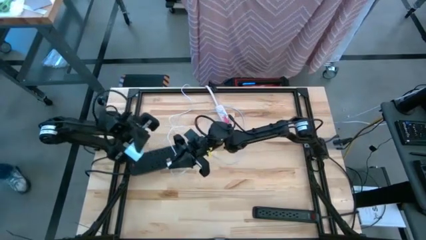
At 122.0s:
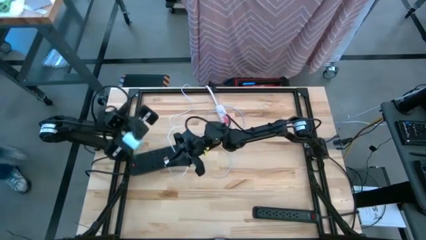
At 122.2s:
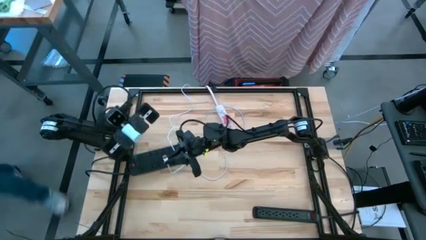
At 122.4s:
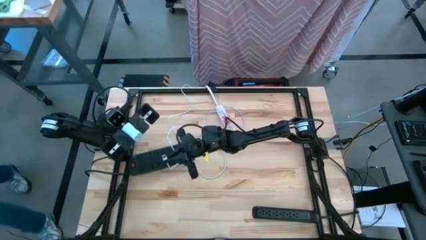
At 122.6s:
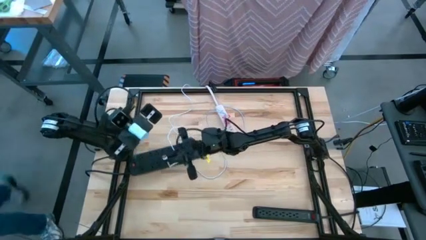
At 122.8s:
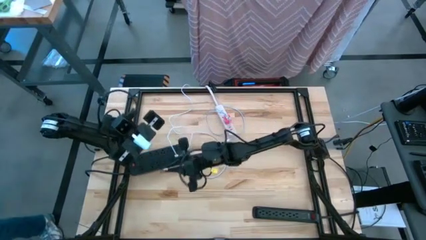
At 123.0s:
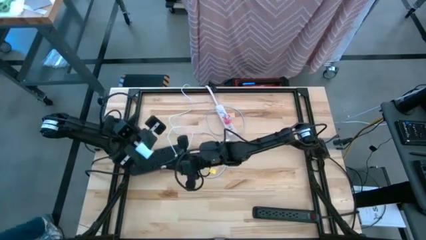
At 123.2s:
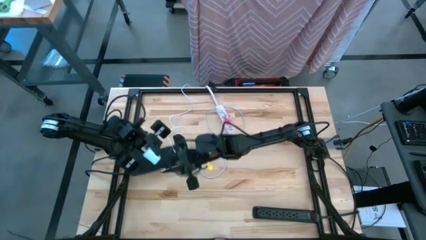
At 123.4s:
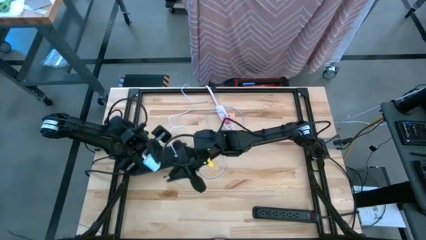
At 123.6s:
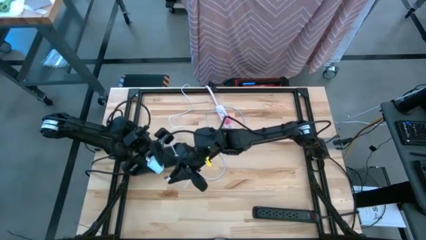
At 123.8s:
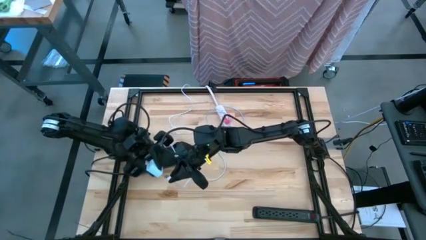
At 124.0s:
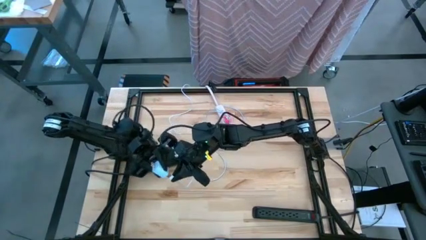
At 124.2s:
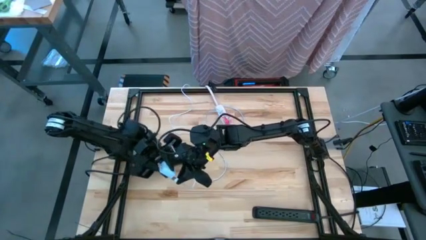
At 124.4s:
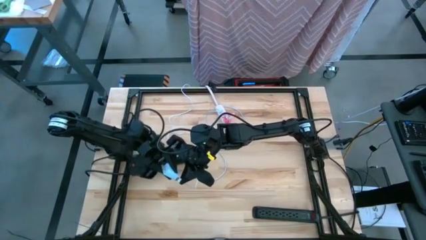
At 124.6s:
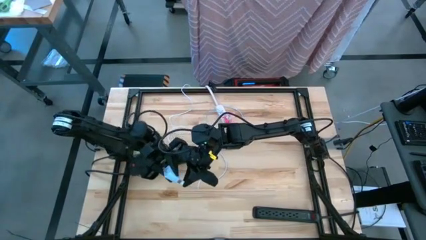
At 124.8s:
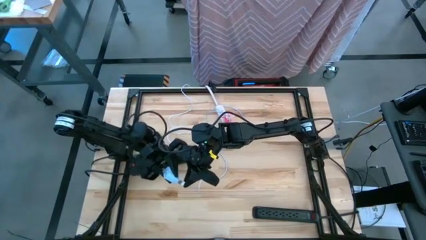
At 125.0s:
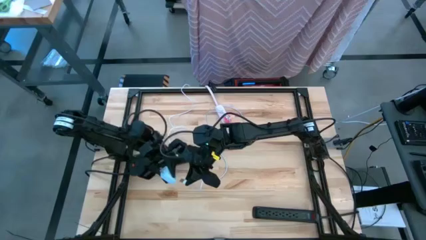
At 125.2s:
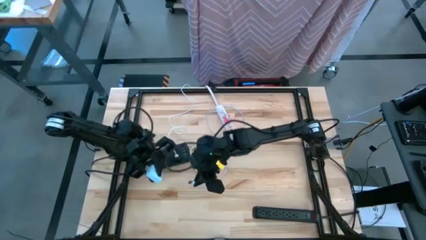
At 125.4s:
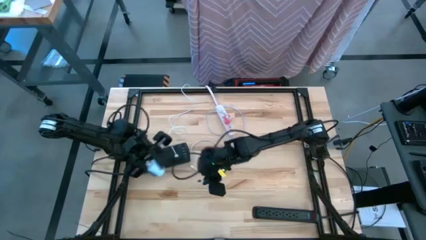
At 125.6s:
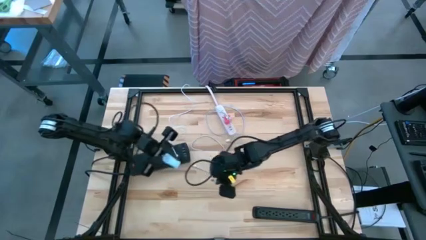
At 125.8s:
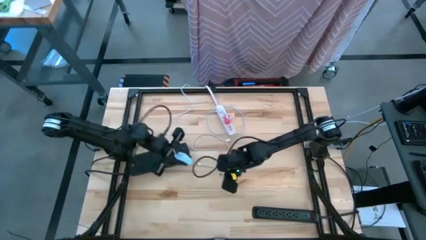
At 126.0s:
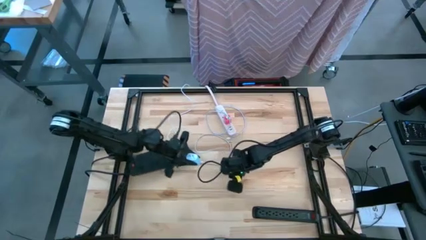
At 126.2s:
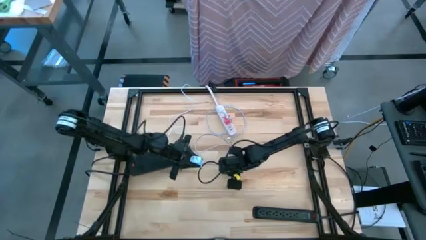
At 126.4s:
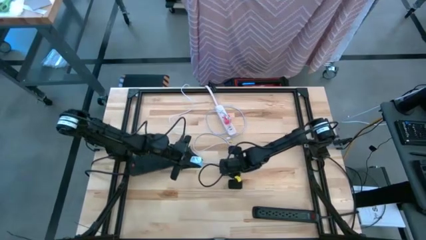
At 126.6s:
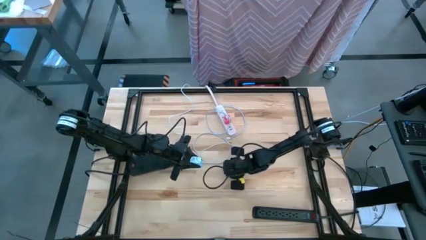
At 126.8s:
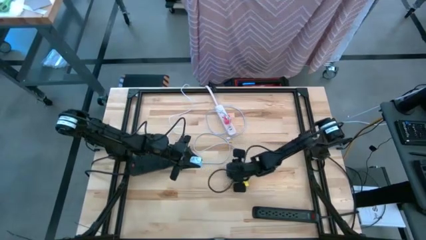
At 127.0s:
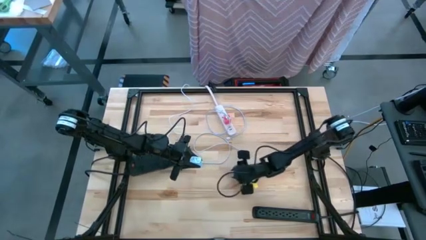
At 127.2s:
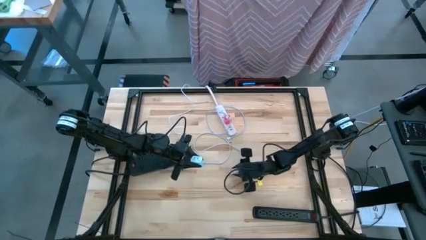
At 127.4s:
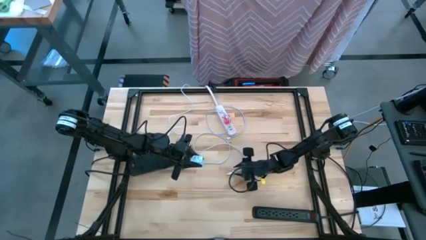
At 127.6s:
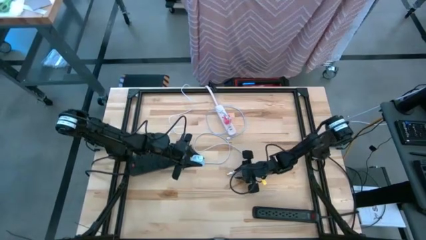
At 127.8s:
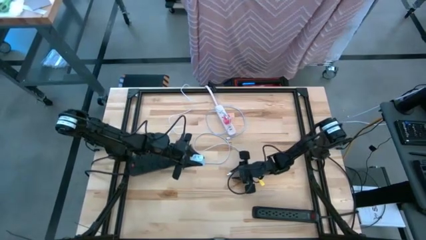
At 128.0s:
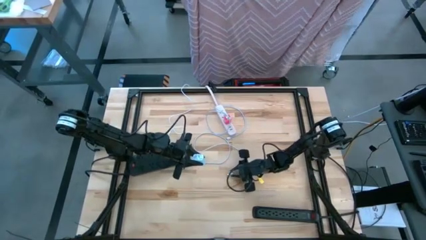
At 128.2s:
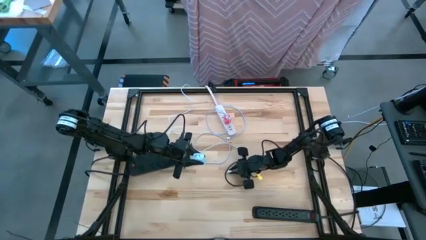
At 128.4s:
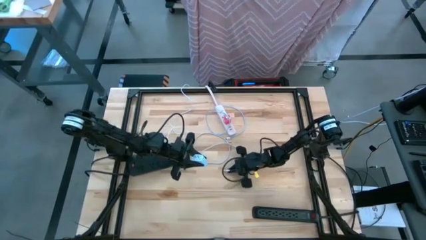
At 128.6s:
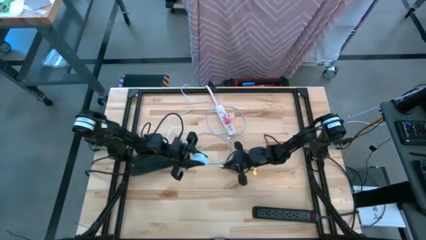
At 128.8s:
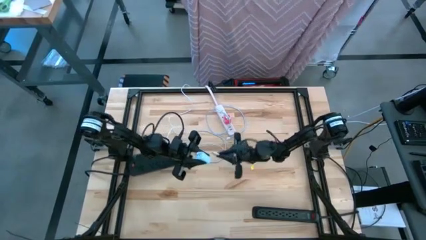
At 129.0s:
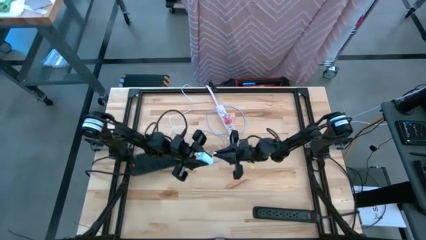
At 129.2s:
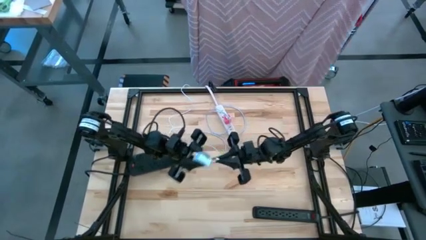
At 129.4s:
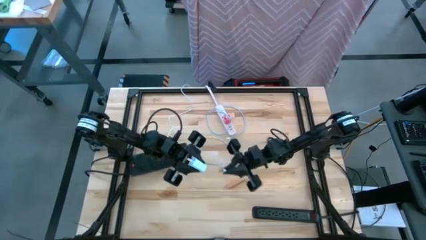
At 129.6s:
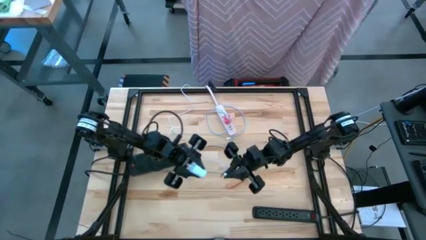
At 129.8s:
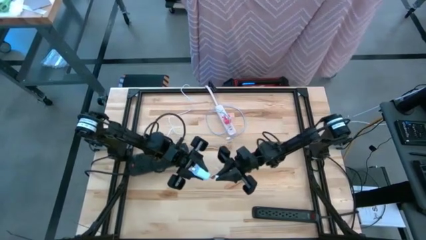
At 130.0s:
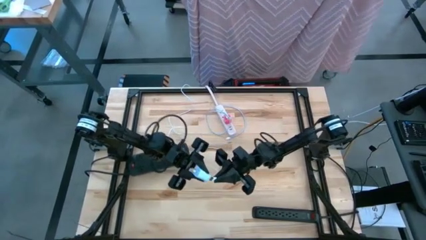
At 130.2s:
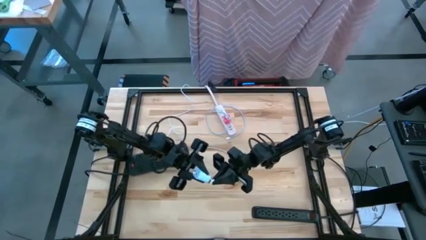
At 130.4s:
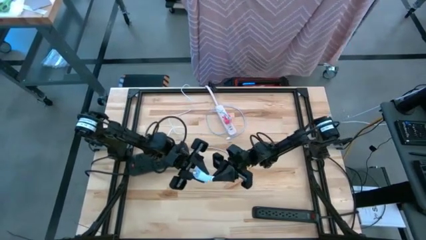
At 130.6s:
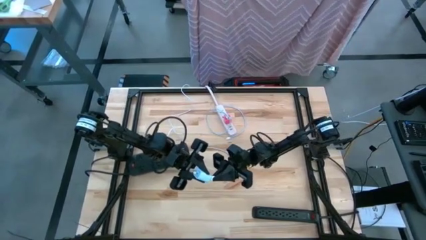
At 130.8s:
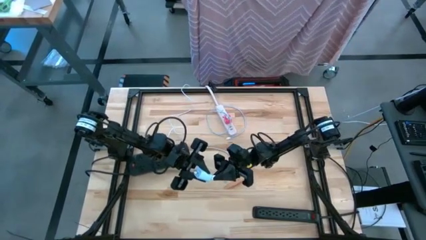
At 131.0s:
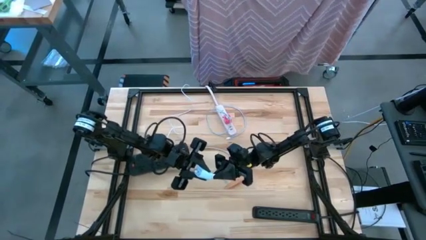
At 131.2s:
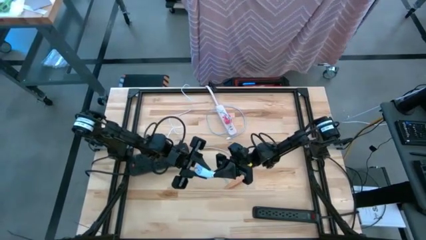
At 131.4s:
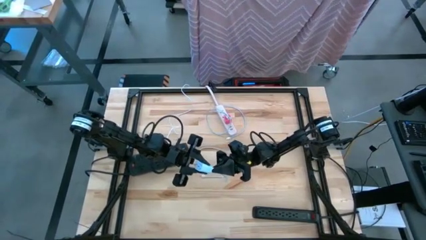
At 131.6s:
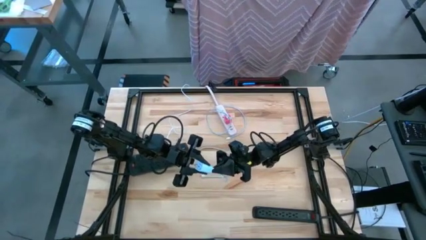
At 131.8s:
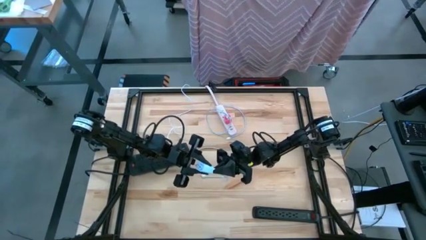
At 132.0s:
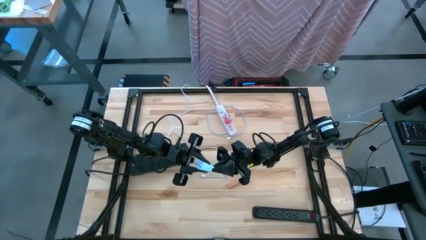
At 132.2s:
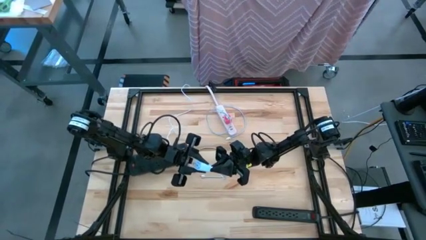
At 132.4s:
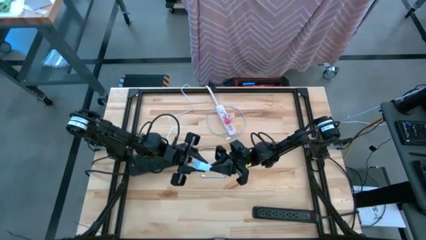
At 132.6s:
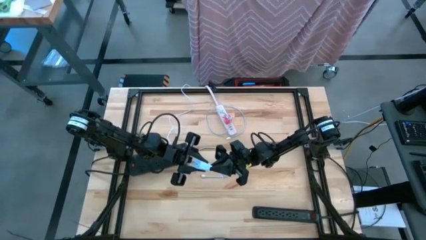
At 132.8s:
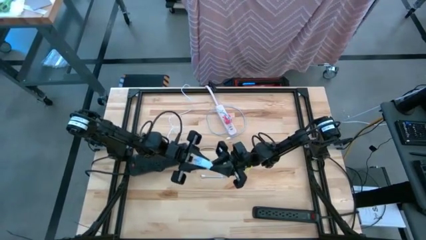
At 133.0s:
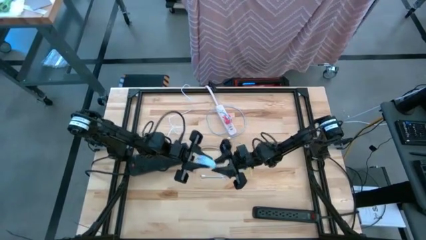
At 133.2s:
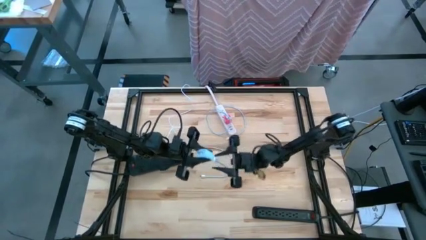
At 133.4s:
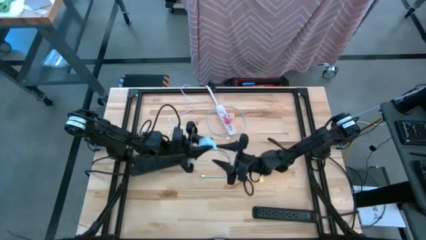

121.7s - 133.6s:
Task: Insert USB
Insert the white charger cable to the white charger adapter

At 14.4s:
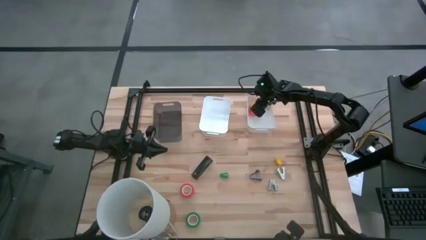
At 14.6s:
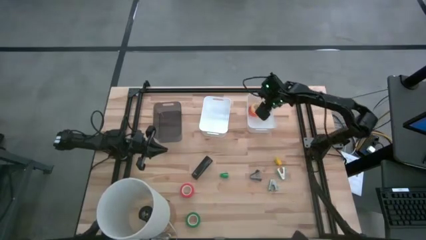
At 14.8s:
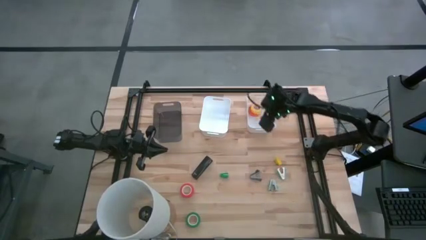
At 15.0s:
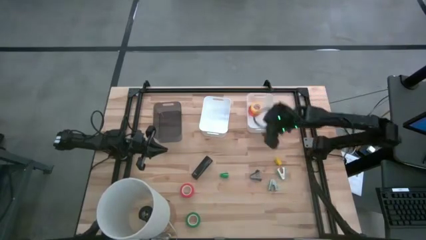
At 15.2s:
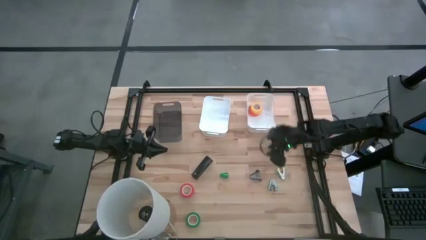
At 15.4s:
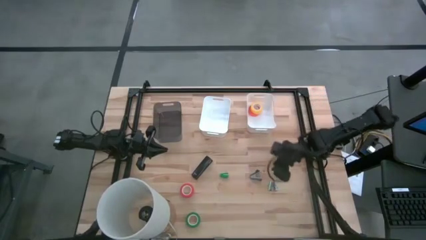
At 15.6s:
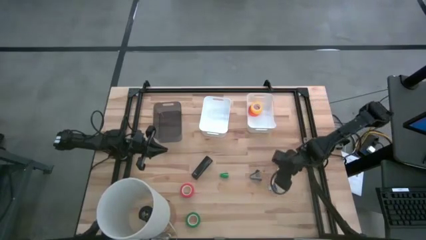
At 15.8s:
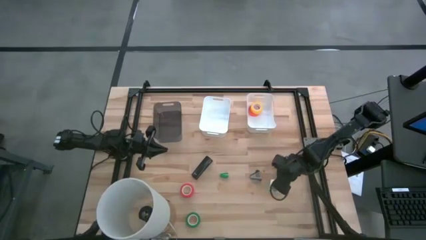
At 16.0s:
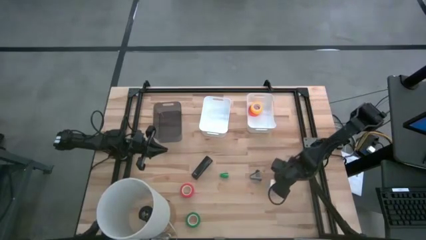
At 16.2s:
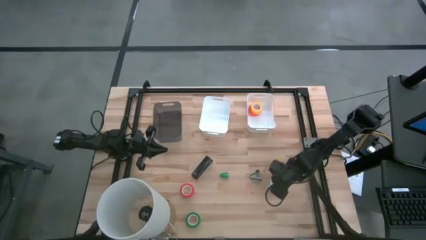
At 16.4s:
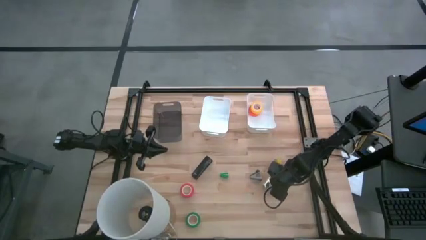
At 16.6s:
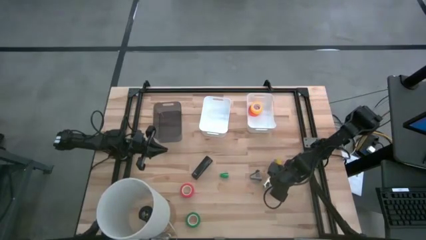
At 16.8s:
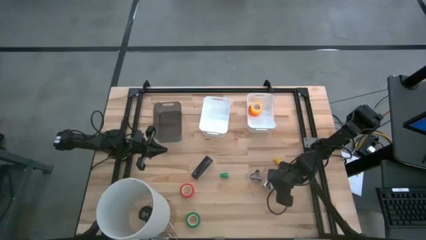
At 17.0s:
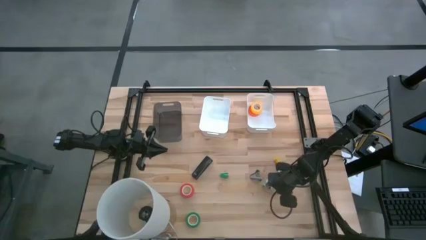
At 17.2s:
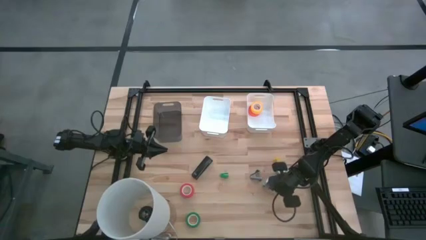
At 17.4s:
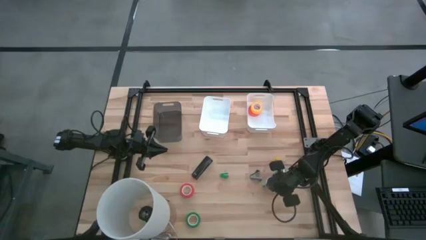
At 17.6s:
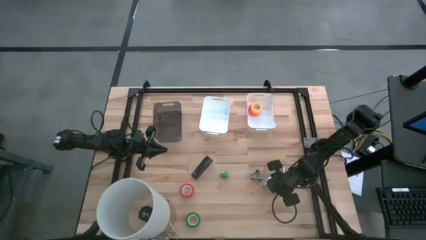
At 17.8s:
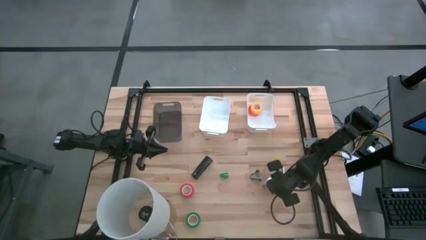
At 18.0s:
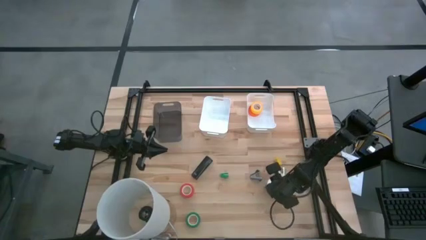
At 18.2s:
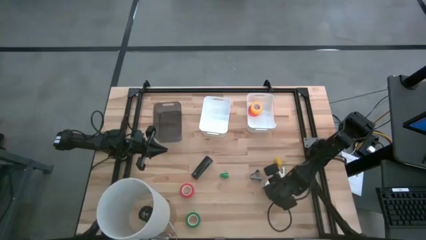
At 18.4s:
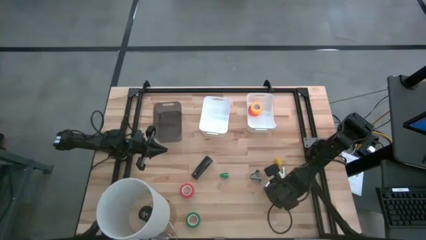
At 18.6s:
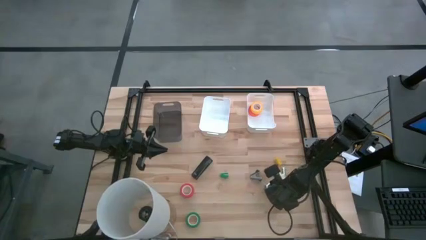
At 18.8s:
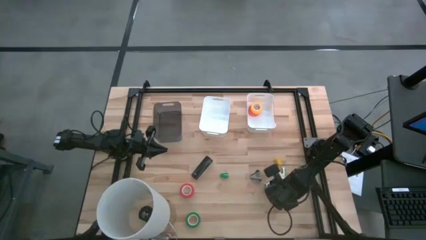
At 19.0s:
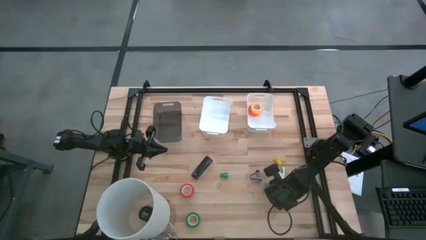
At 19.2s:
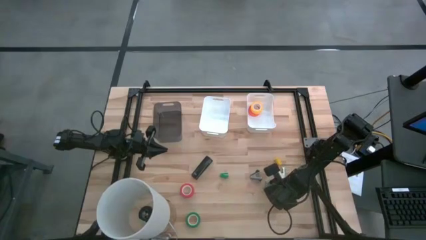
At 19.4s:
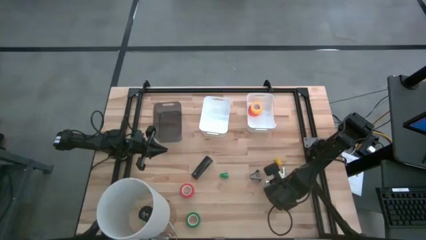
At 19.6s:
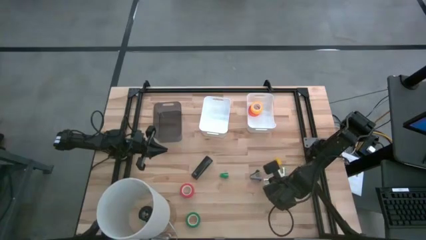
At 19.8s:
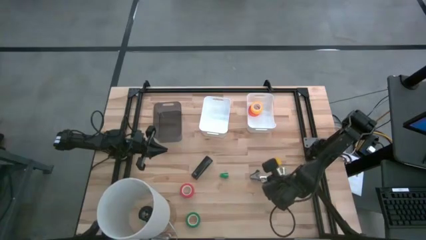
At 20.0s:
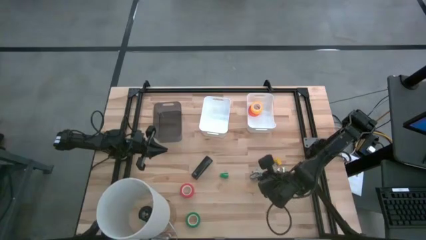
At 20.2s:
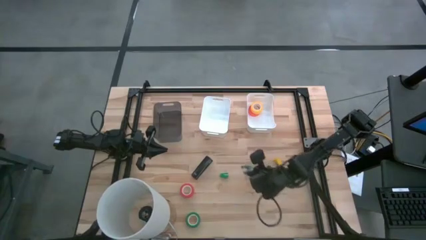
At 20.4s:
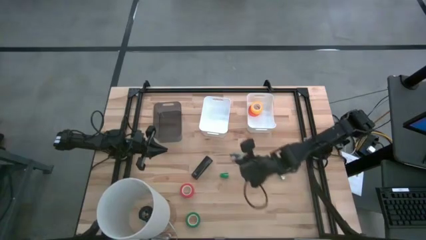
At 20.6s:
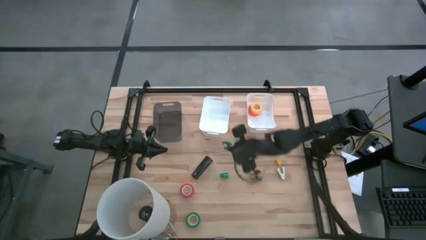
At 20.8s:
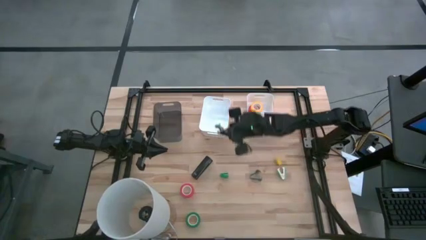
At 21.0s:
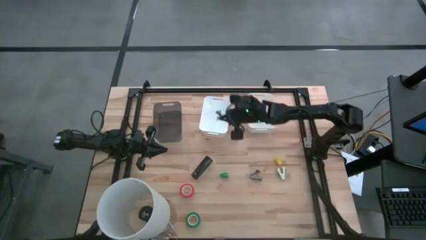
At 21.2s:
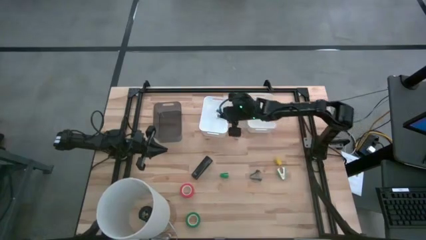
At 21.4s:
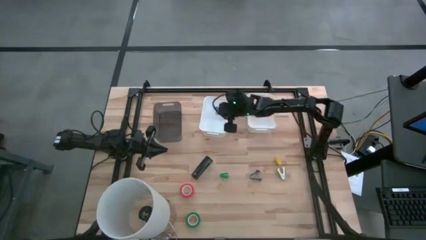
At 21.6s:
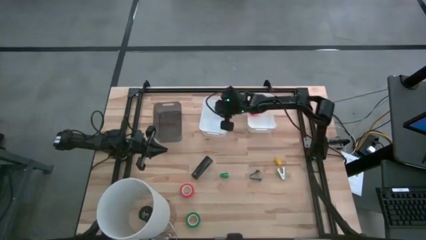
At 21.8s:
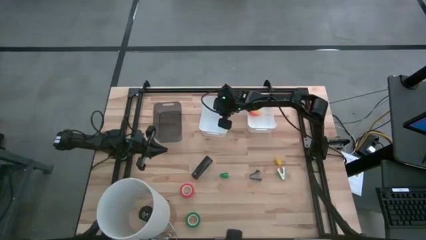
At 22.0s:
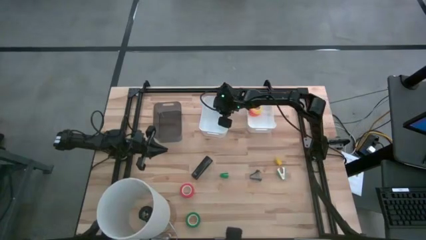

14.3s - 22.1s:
Task: Pick and place Stapler, Stapler remover, tape
Put the light blue stapler remover into the left white bin
